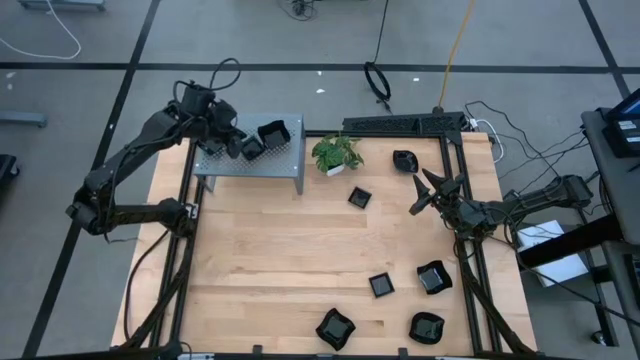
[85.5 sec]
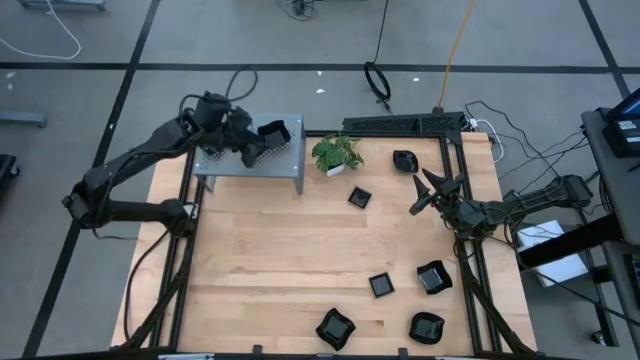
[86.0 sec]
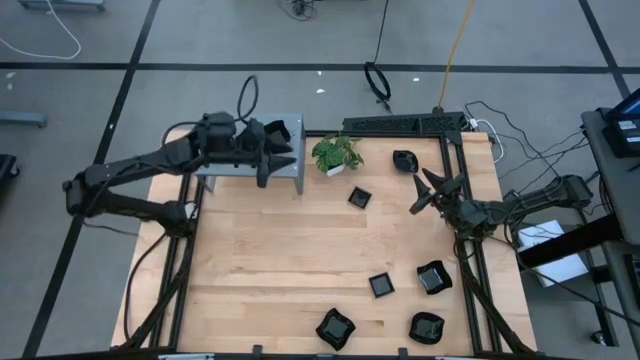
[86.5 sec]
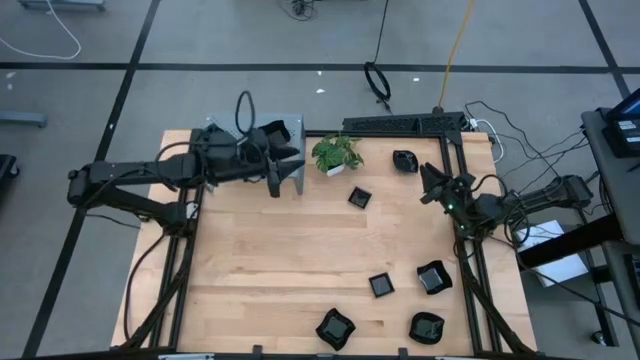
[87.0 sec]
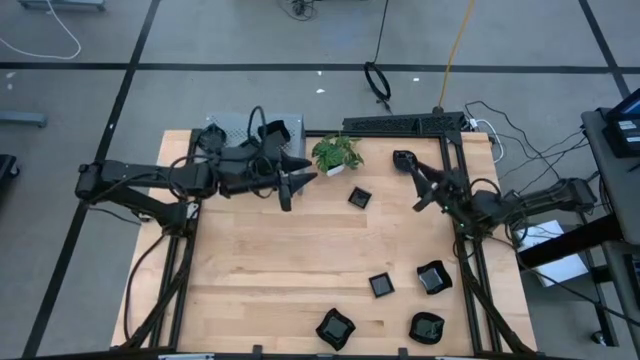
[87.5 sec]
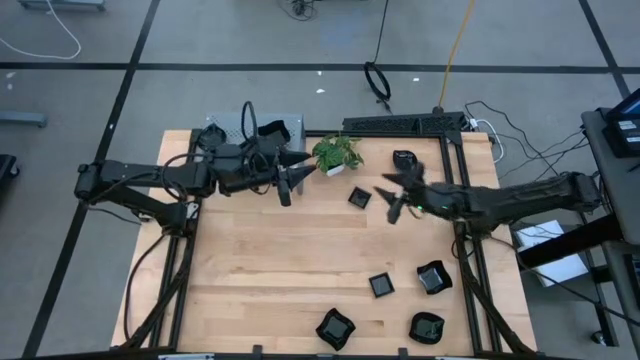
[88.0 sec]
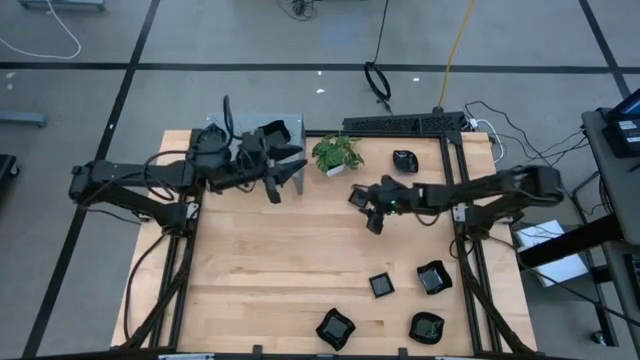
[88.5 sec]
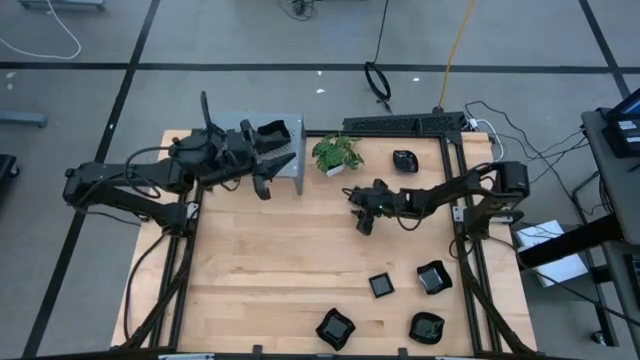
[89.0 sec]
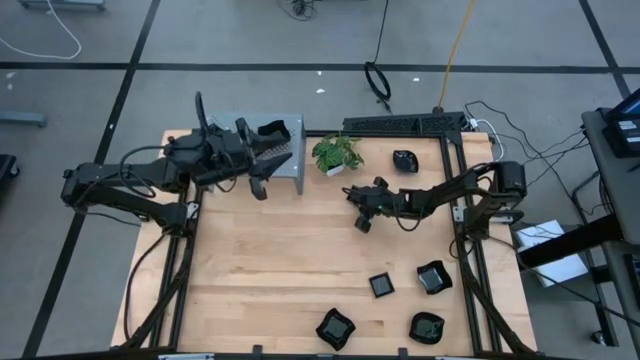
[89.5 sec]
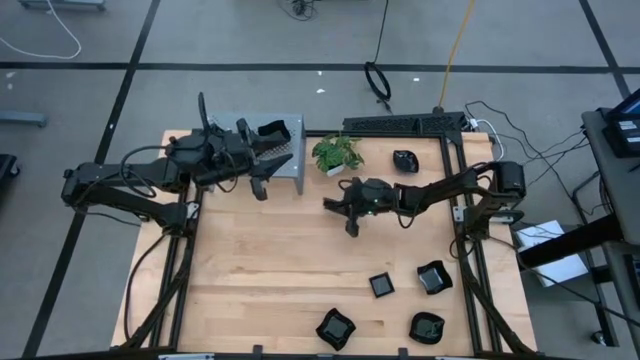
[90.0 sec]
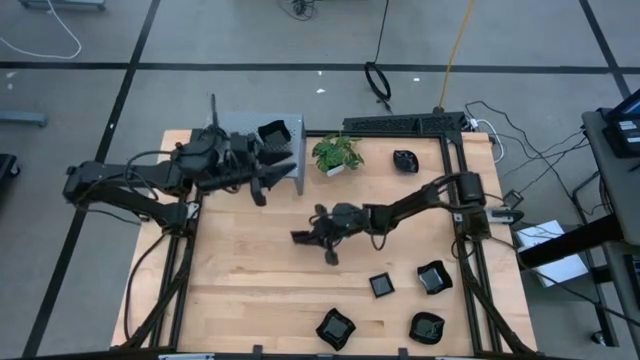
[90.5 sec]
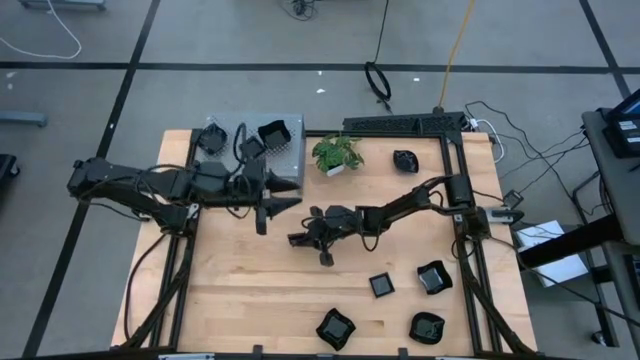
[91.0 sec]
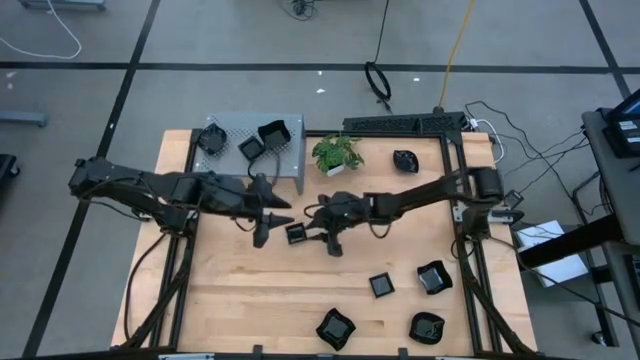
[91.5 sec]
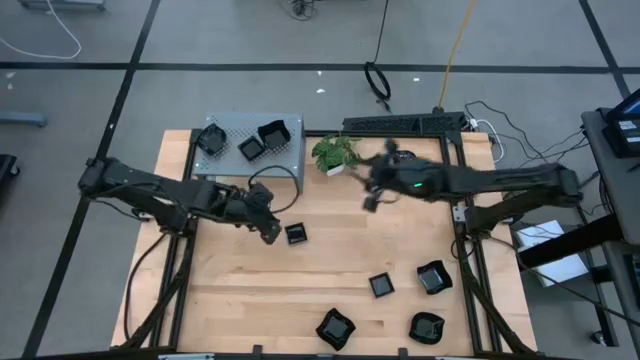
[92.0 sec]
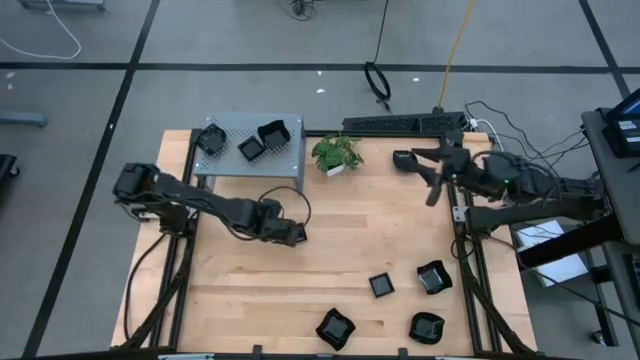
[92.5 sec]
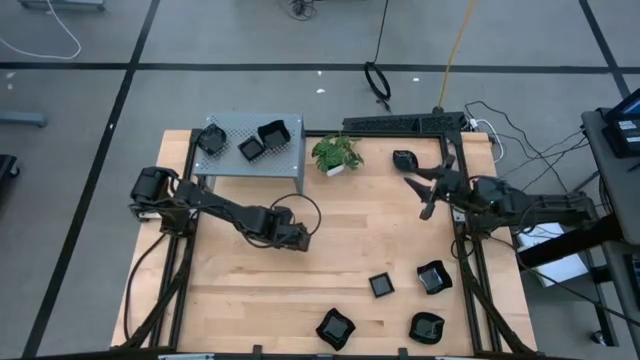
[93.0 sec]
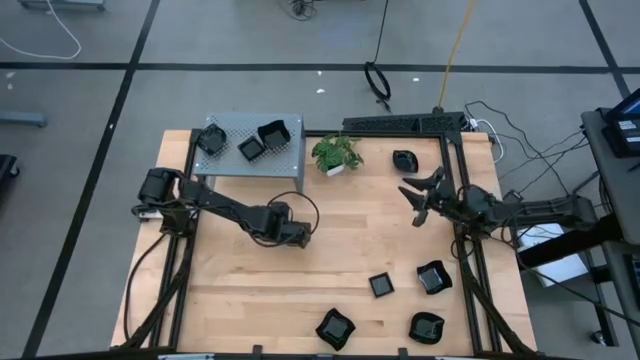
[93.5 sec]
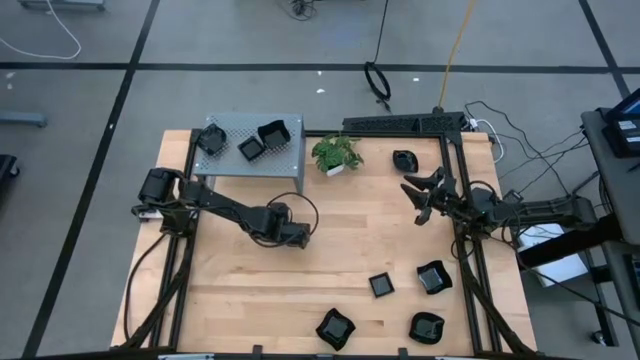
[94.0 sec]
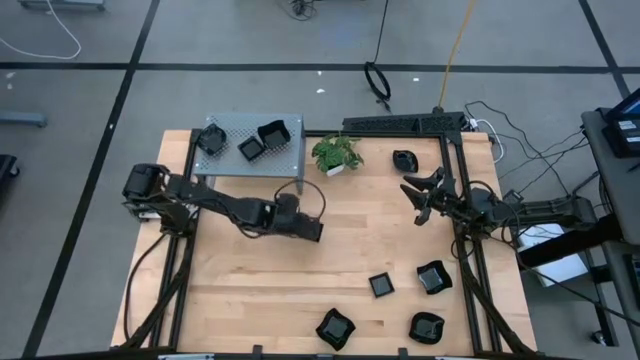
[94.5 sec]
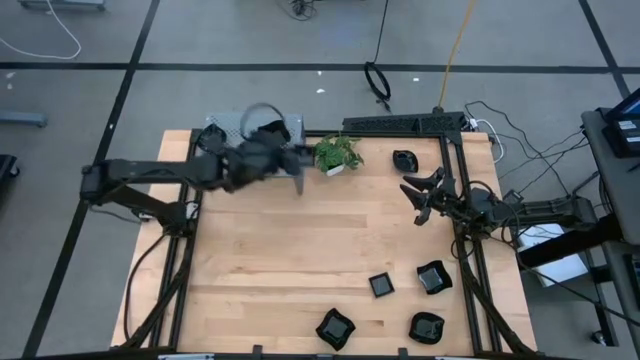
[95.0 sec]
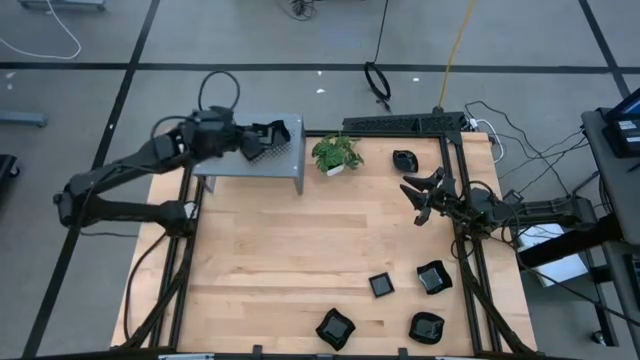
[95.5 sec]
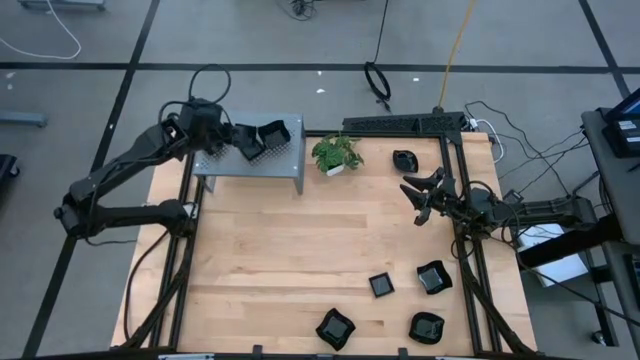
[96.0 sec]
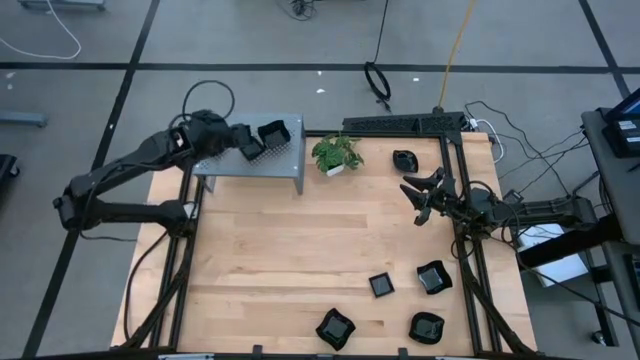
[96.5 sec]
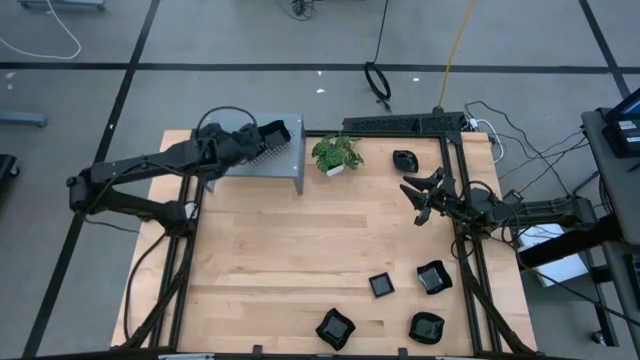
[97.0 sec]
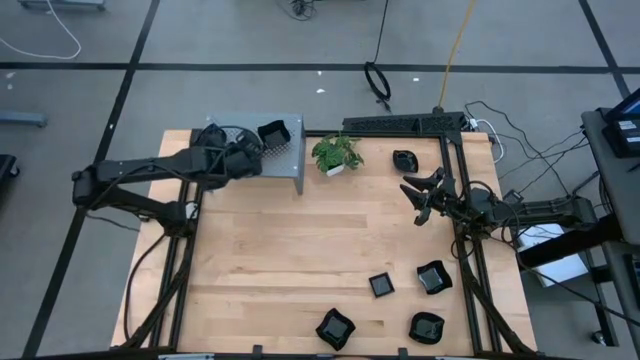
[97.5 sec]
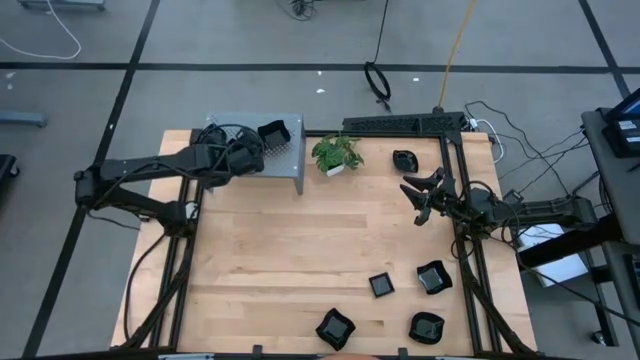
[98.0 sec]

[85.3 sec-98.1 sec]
Task: Pick & Place Mini shaped plates
Stack the black square plate on top of the other black square plates on the shelf

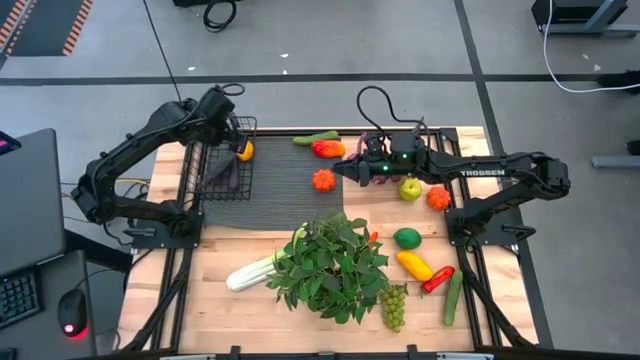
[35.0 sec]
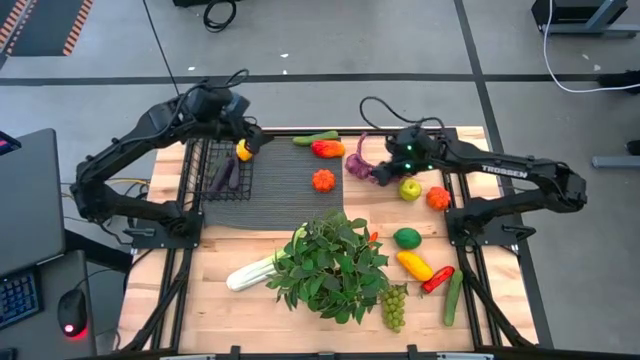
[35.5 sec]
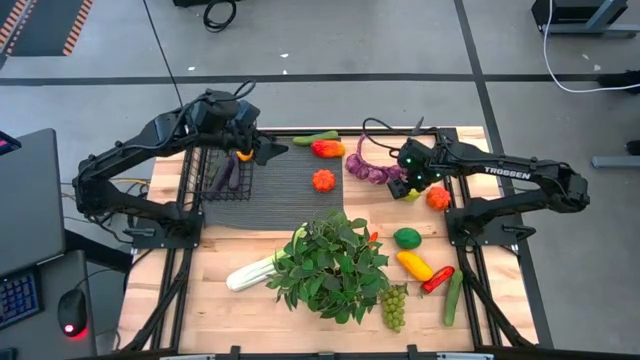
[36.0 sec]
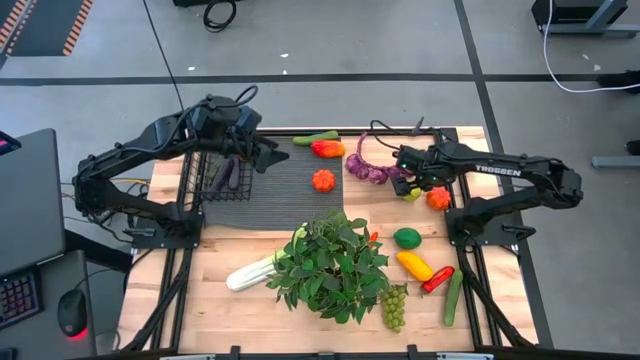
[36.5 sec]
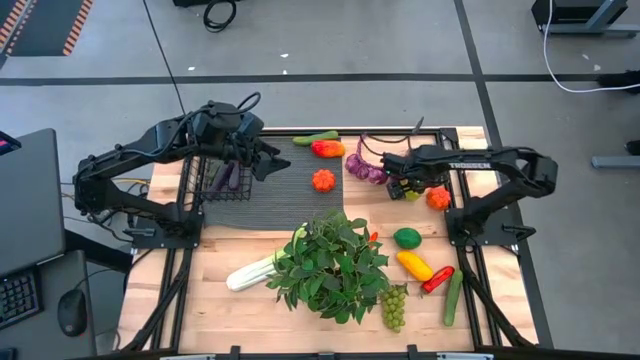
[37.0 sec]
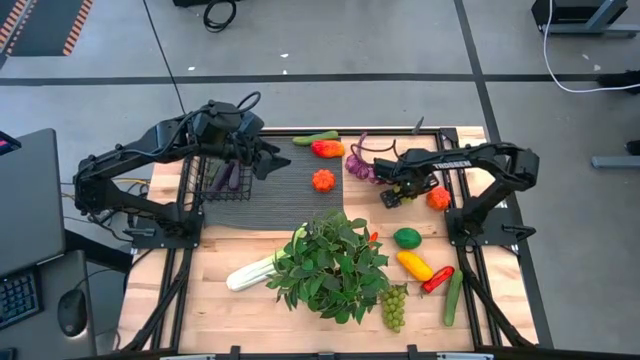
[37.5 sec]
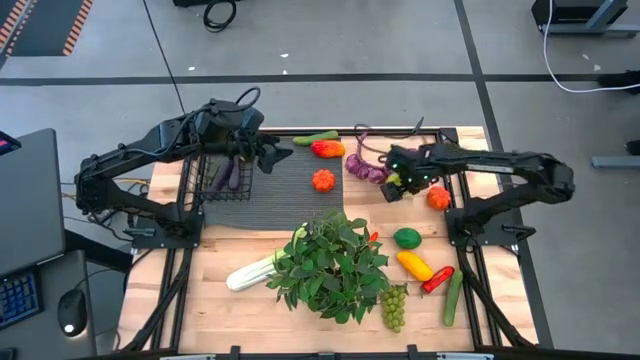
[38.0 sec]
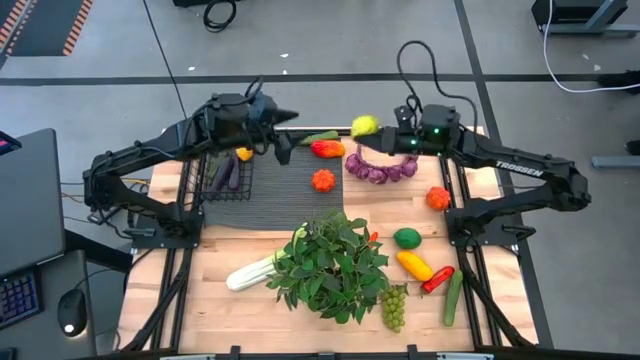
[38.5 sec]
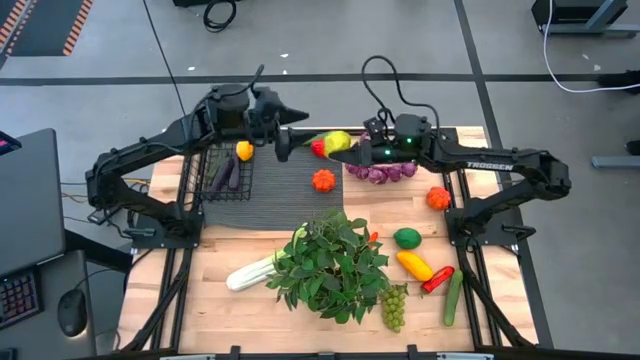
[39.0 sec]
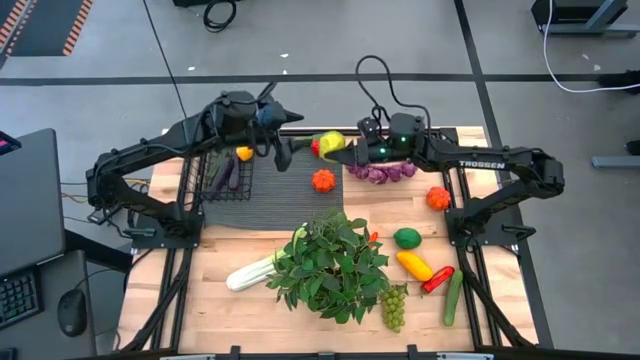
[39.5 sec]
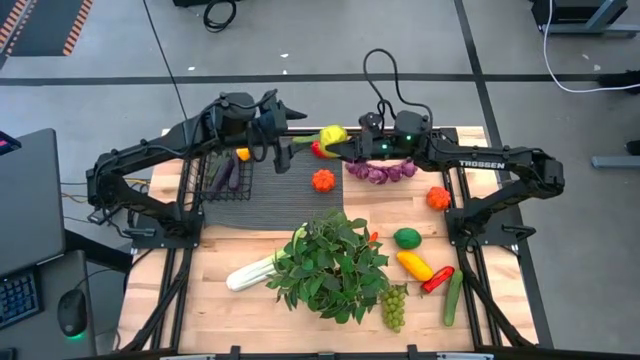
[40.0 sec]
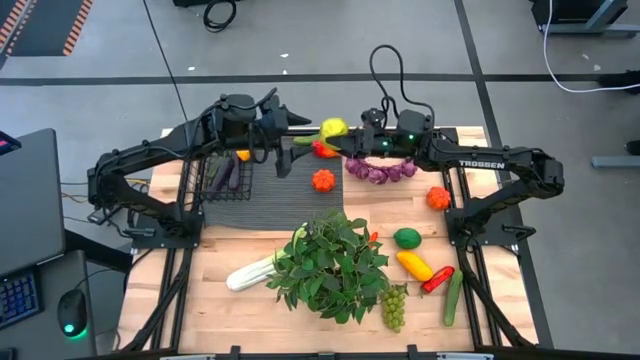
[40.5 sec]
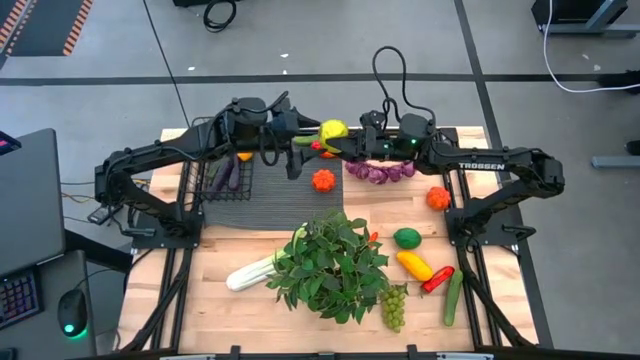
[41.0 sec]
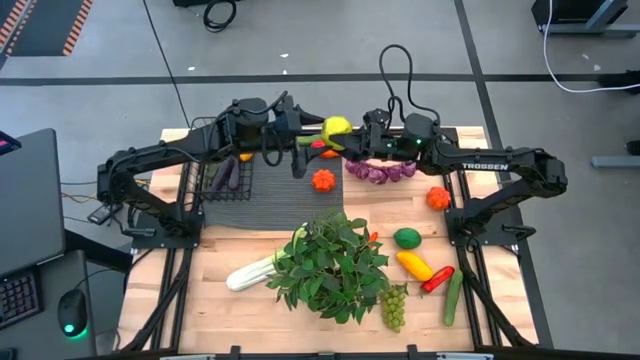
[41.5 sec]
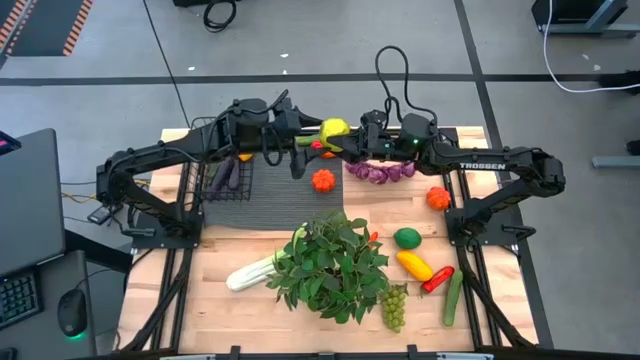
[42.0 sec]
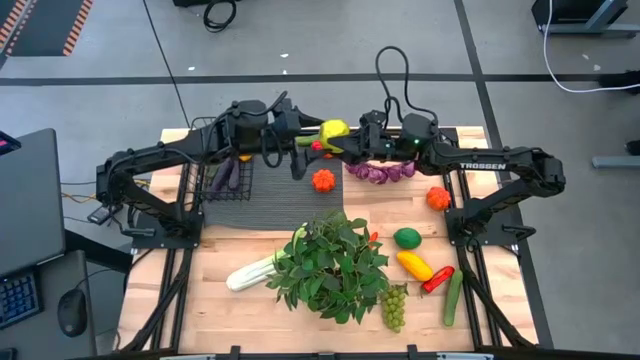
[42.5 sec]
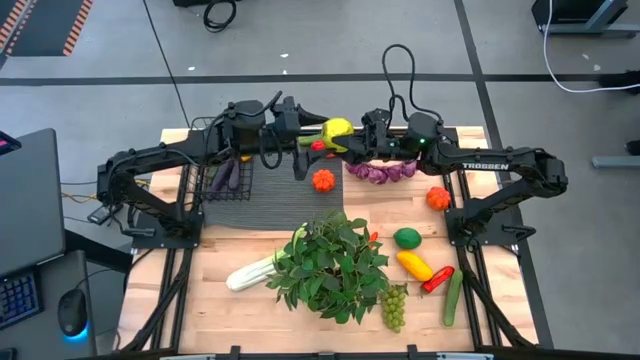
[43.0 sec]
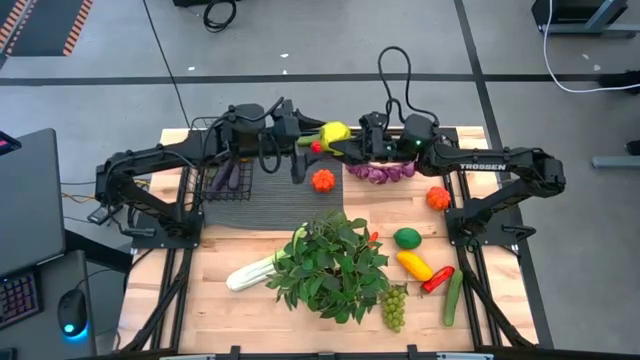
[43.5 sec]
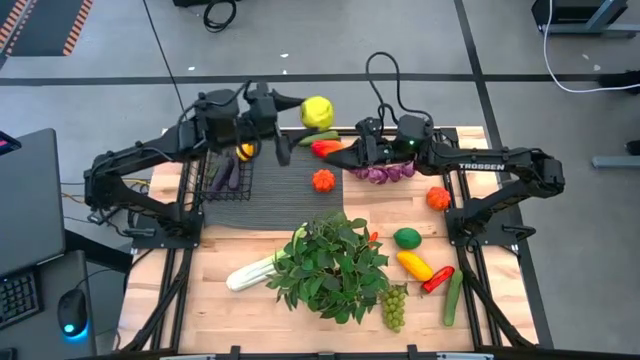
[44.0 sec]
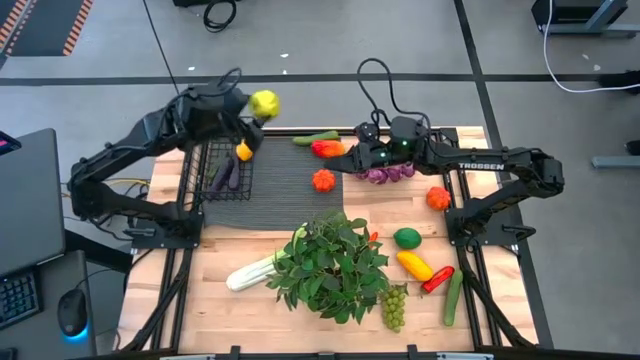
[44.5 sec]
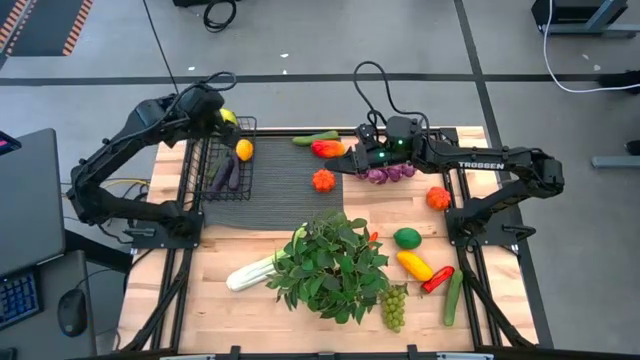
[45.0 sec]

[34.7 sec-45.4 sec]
Task: Build produce basket
Put the green apple into the wire basket
